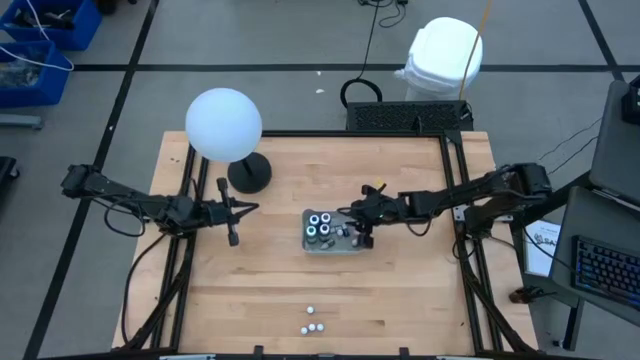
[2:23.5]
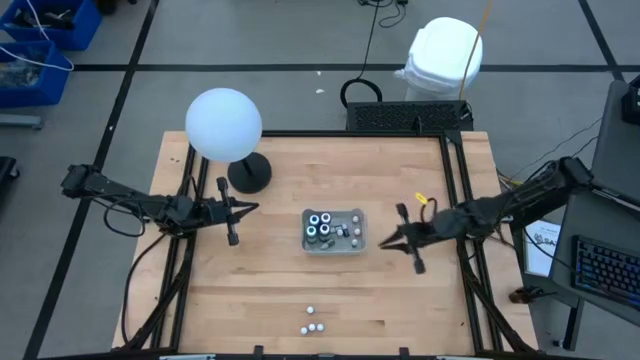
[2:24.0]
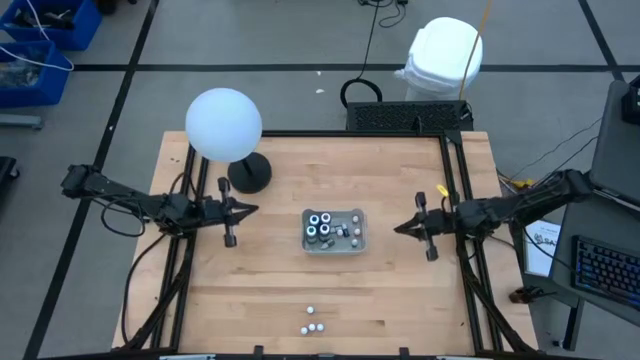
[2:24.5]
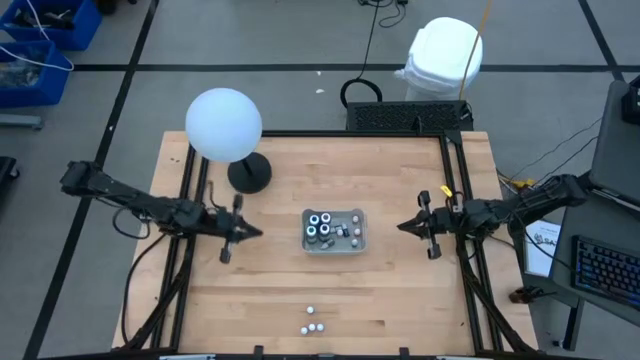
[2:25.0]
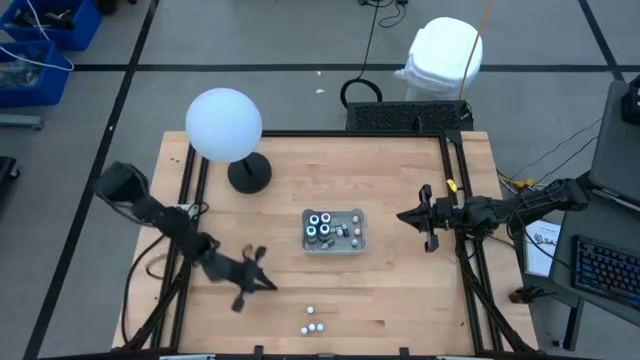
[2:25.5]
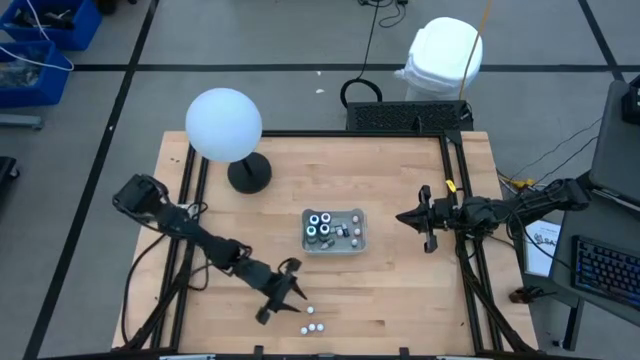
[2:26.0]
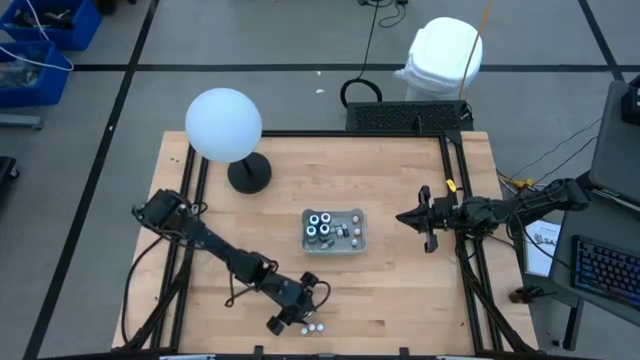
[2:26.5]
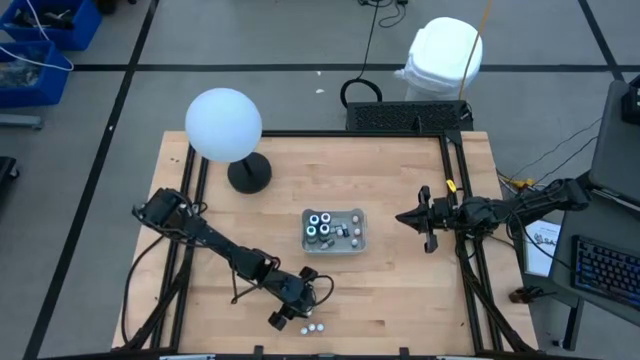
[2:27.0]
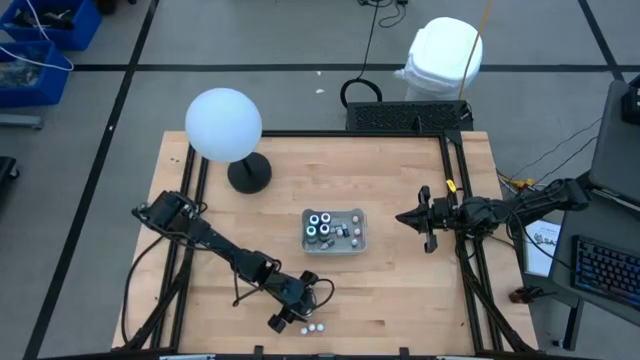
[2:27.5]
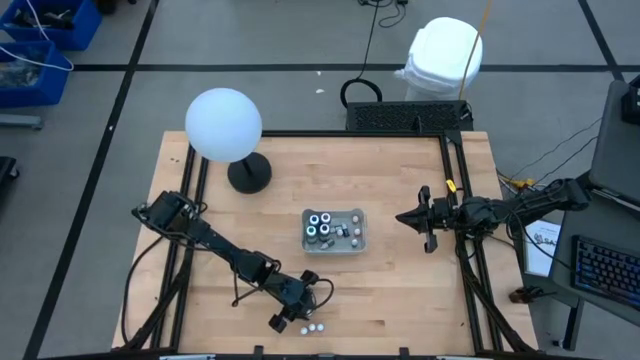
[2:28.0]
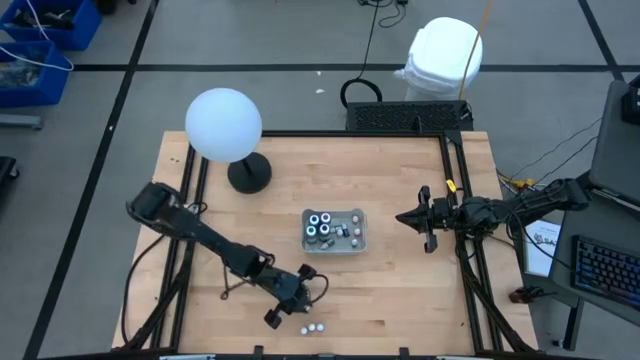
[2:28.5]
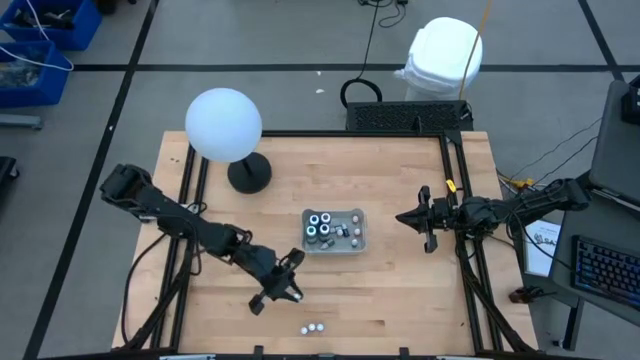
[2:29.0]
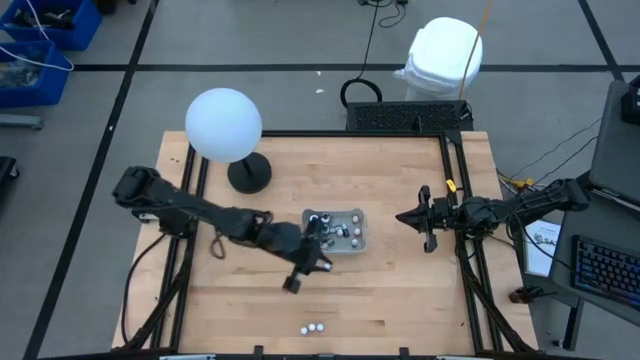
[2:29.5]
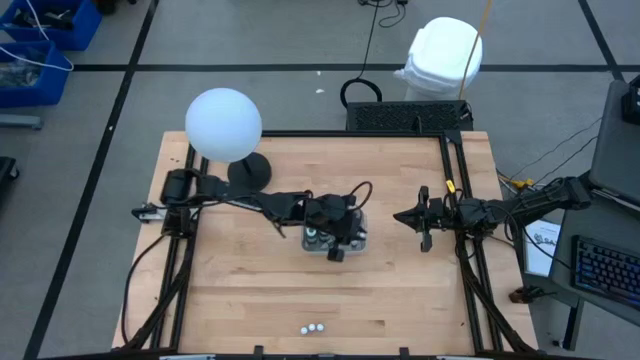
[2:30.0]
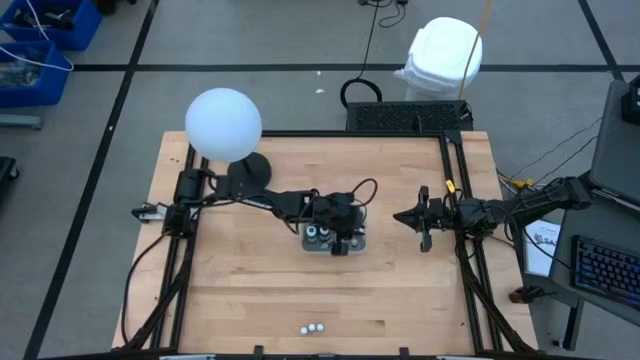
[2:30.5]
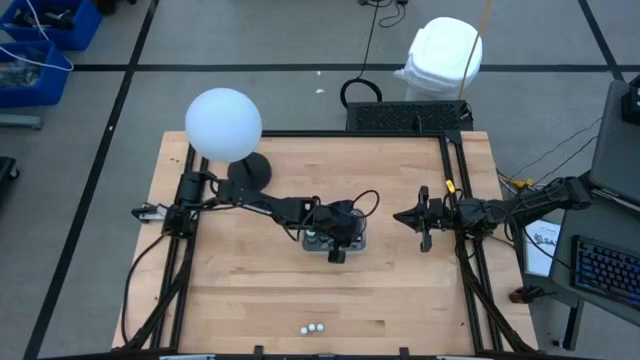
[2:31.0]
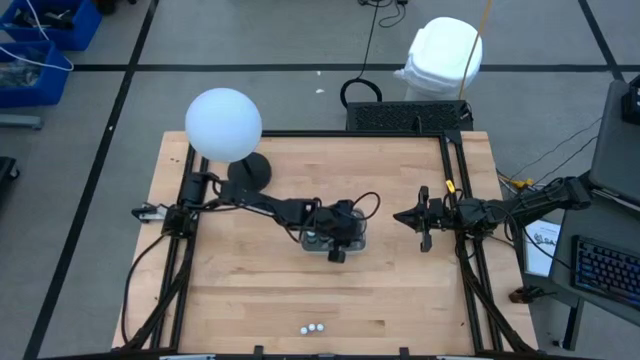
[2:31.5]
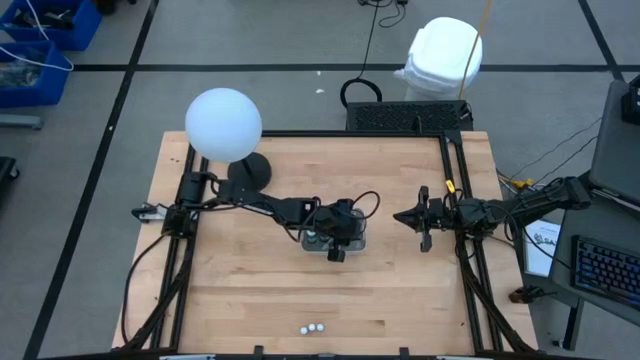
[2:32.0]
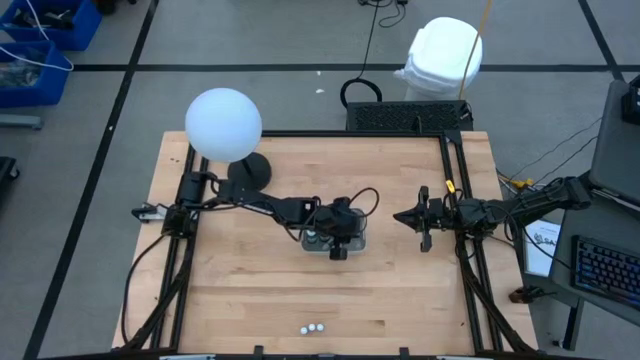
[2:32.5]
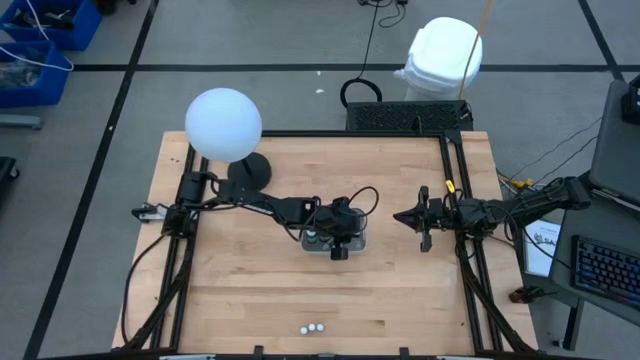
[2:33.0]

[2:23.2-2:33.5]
Task: Pick & Place food coloring
Put the small red food coloring bottle into the gray bin

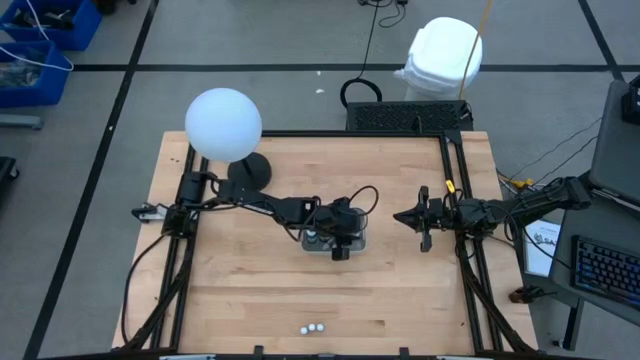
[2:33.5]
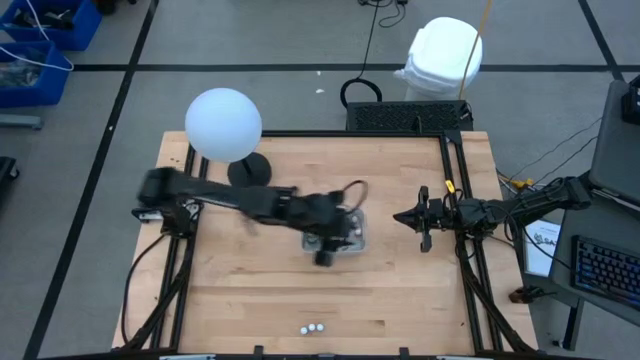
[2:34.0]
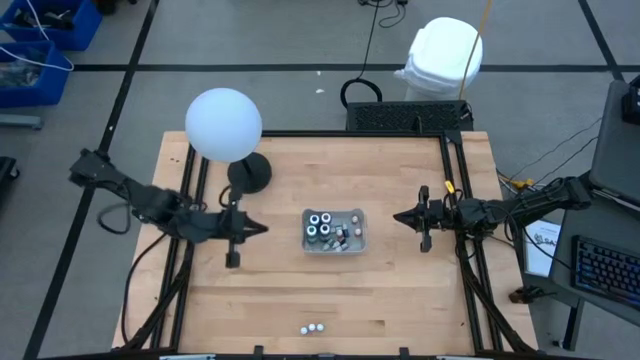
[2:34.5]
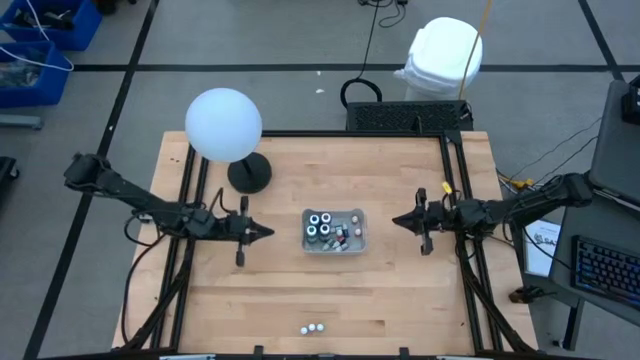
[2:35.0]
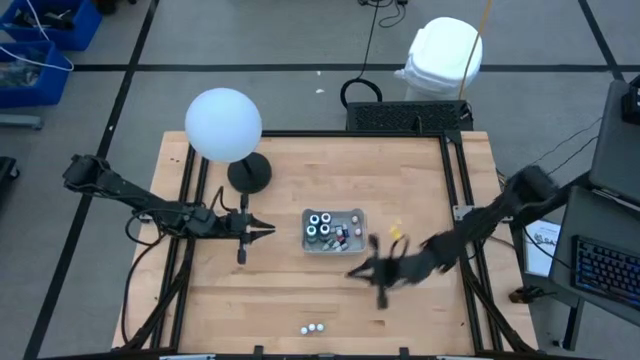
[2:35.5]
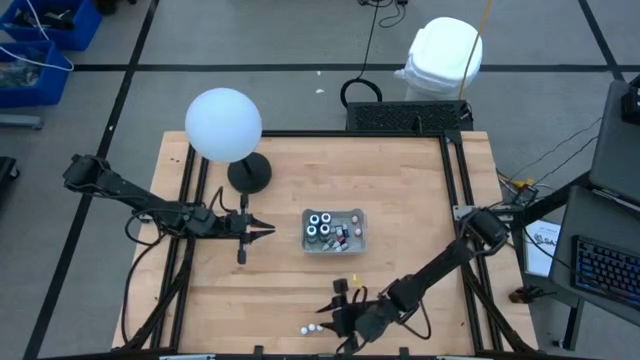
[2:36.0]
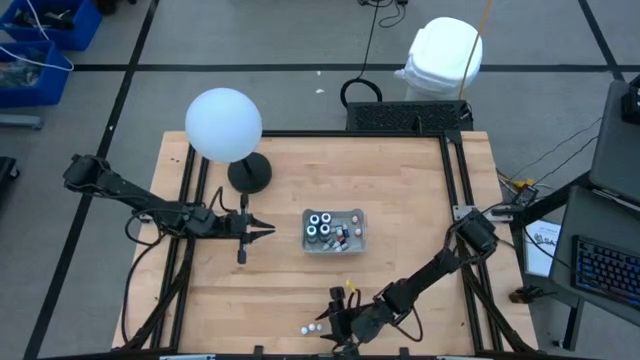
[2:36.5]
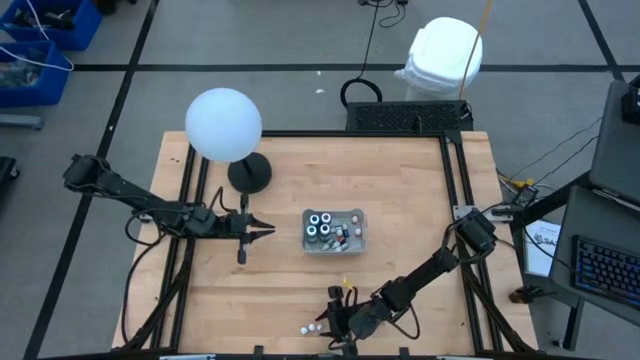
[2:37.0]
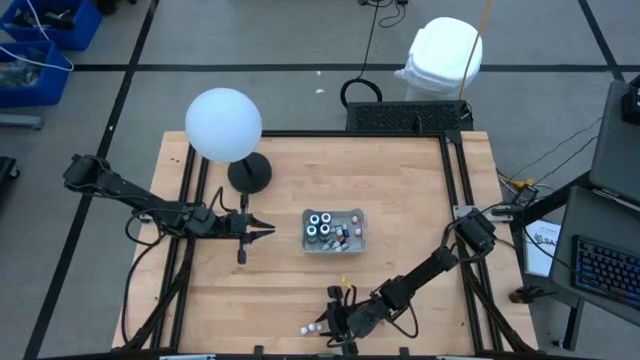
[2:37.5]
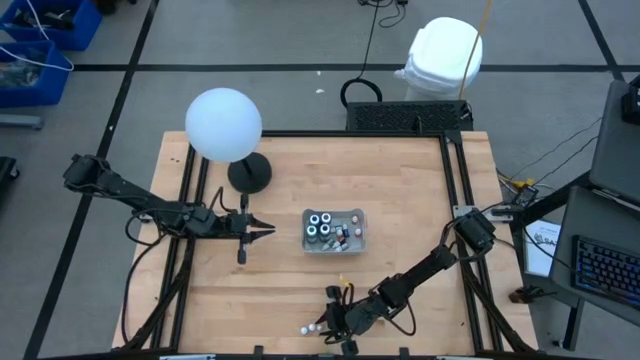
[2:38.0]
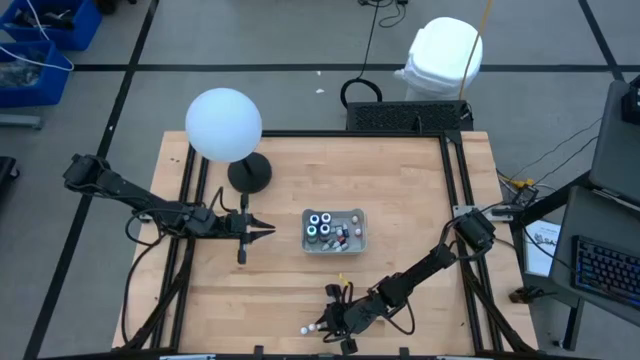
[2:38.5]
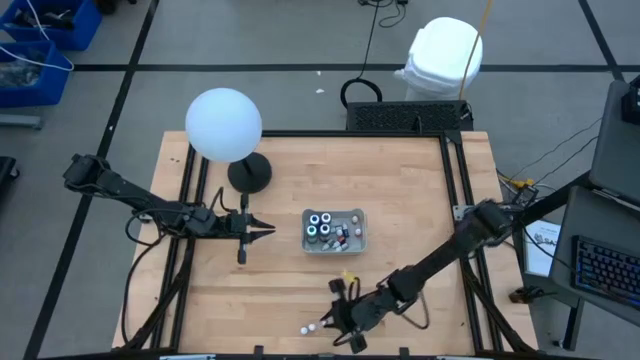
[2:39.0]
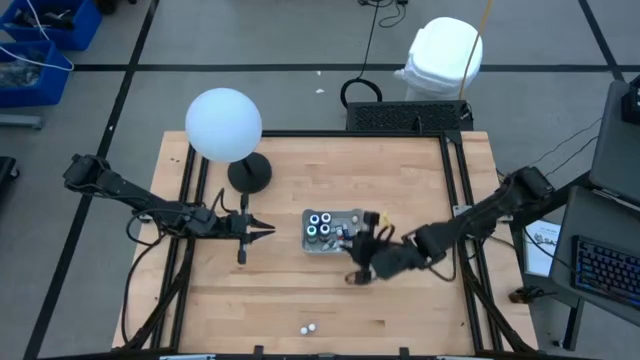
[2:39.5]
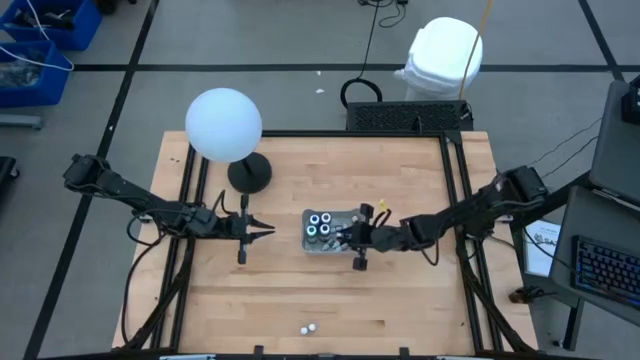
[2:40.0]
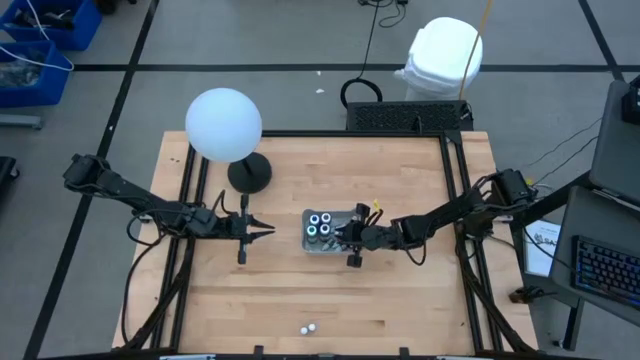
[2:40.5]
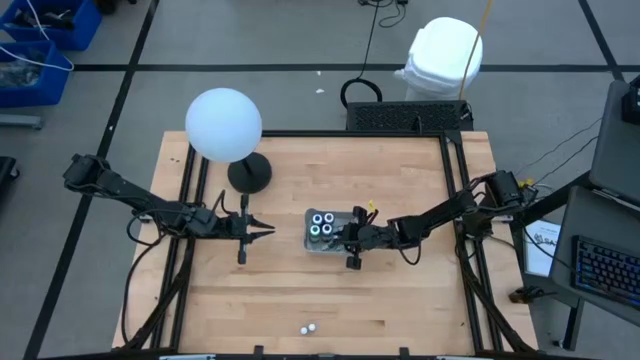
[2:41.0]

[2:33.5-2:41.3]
Put the small blue food coloring bottle into the gray bin

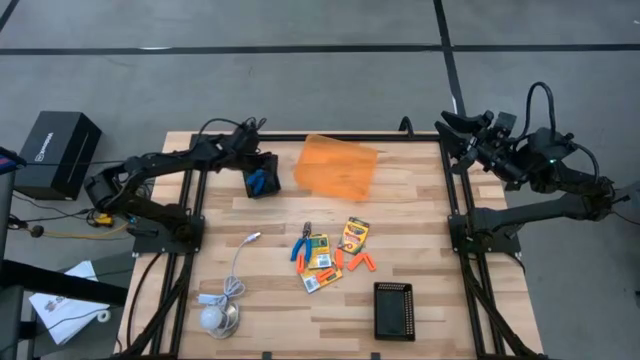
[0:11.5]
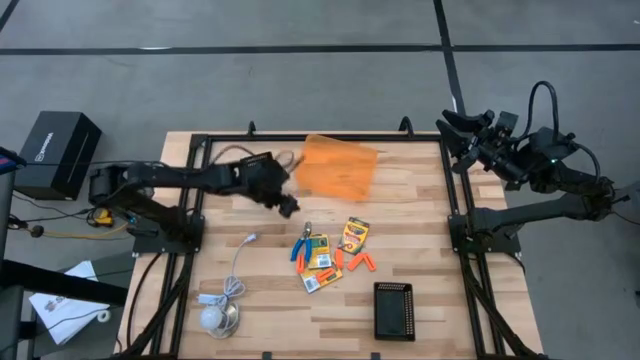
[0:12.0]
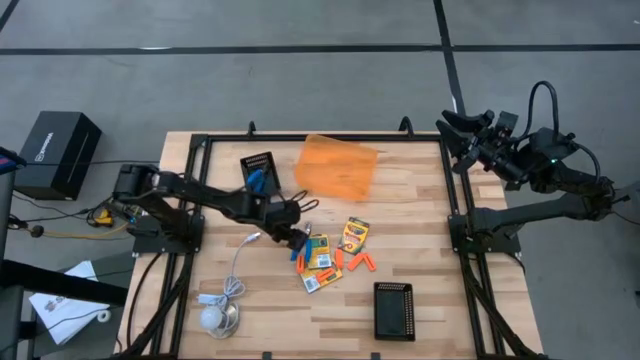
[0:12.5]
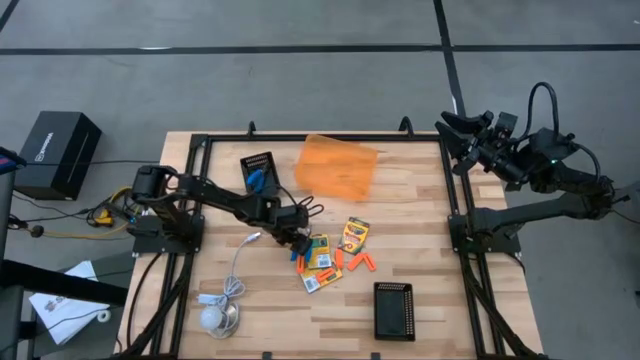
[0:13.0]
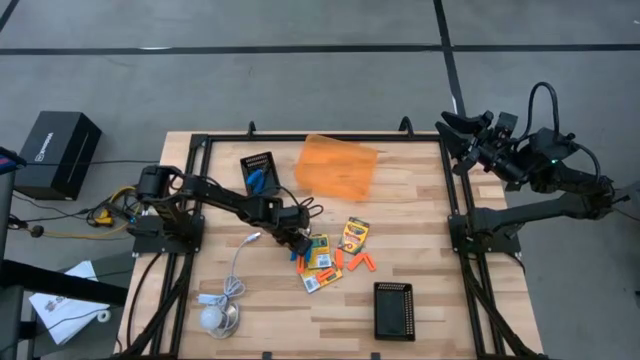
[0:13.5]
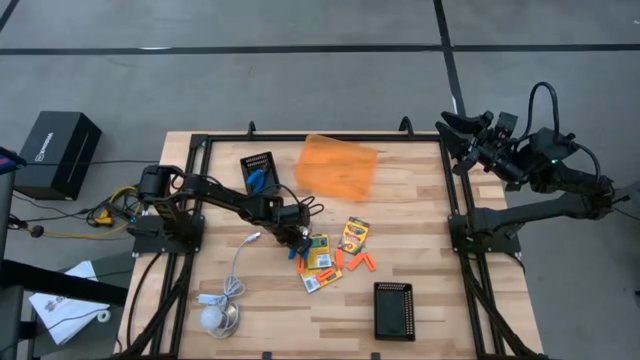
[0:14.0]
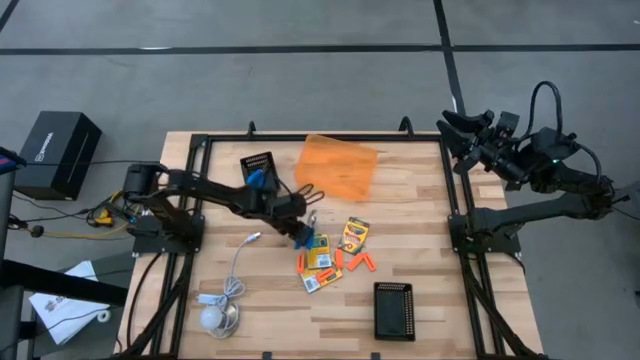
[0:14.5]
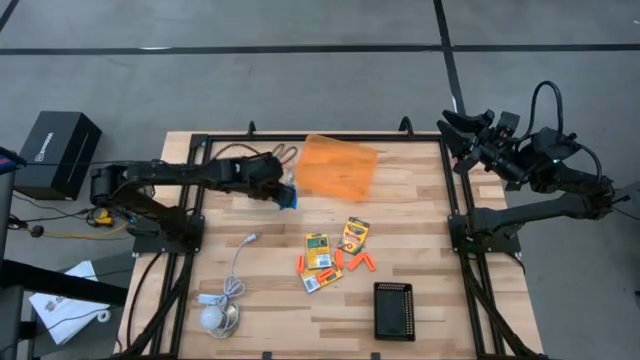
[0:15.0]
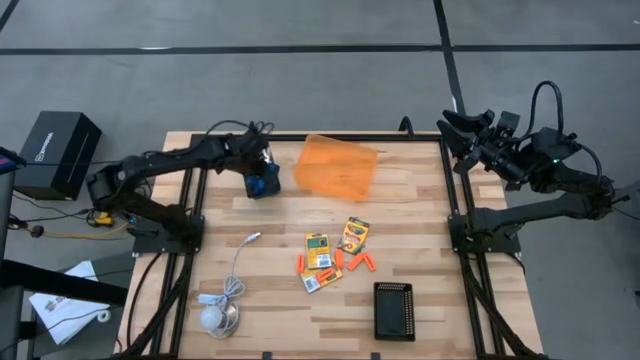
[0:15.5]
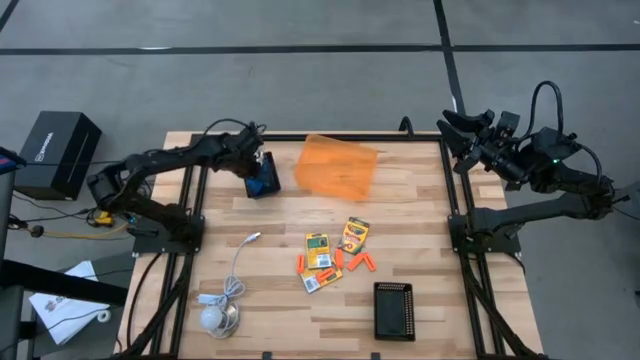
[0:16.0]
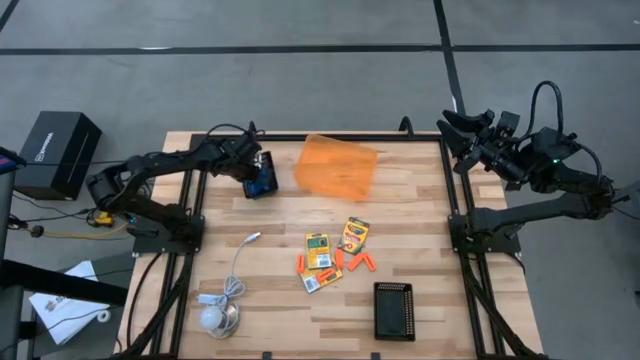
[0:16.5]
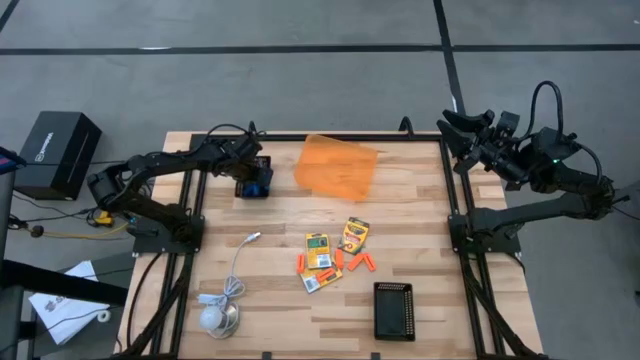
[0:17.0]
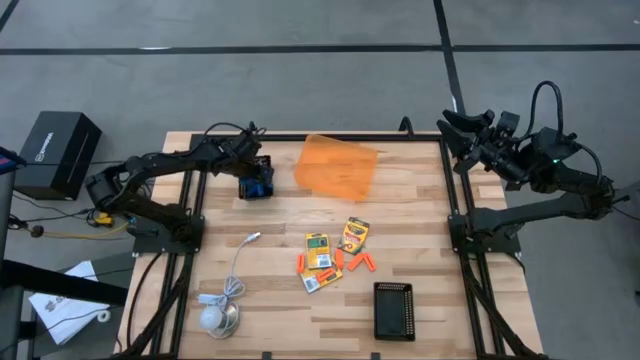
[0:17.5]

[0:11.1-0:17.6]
Task: Pick & Place School Supplies
Put the hole puncher into the top black bin
